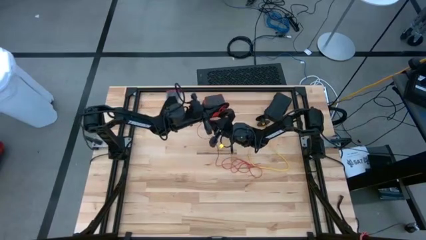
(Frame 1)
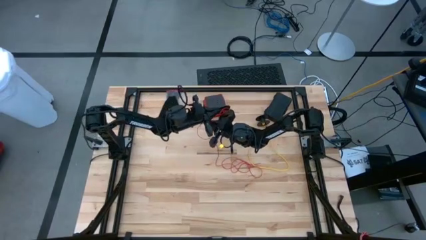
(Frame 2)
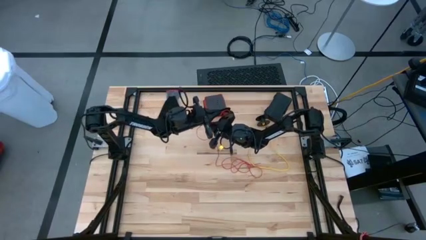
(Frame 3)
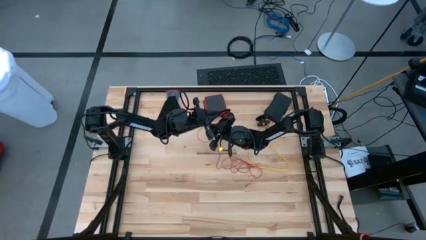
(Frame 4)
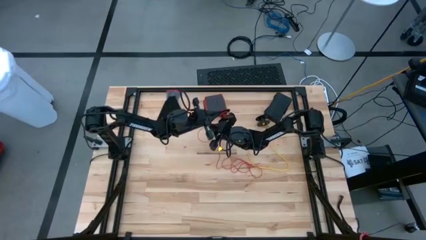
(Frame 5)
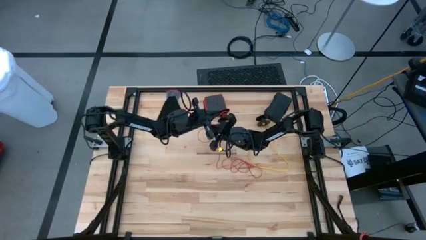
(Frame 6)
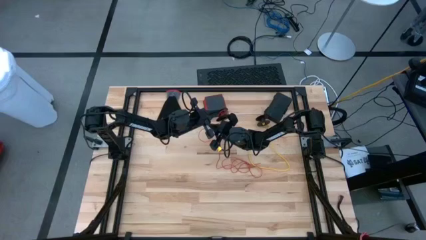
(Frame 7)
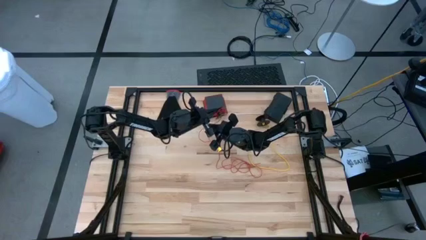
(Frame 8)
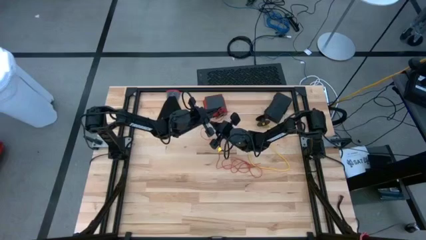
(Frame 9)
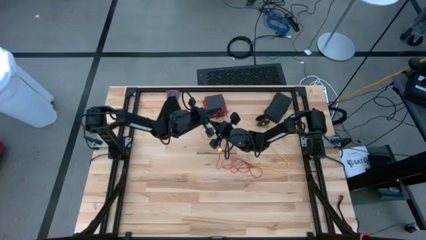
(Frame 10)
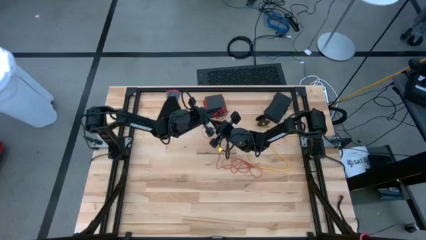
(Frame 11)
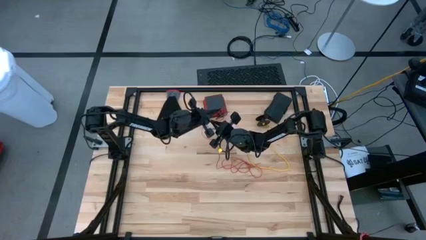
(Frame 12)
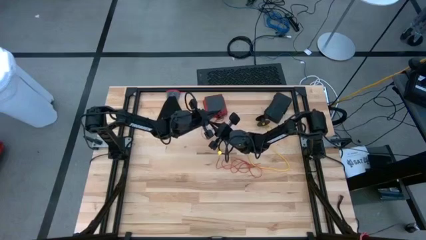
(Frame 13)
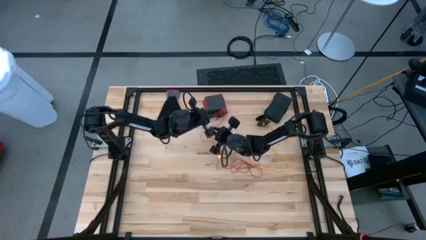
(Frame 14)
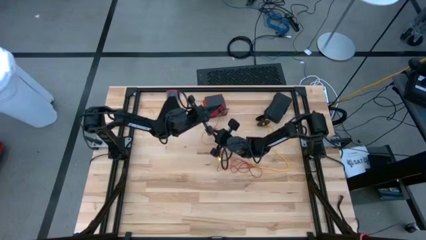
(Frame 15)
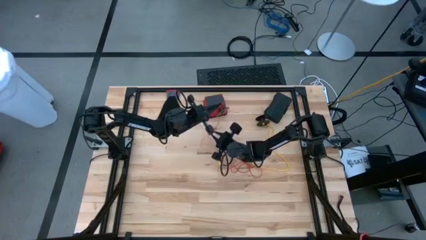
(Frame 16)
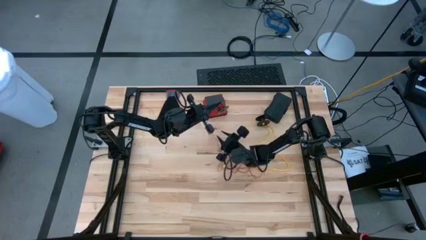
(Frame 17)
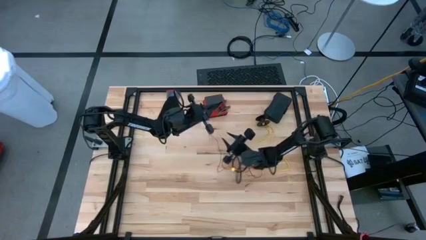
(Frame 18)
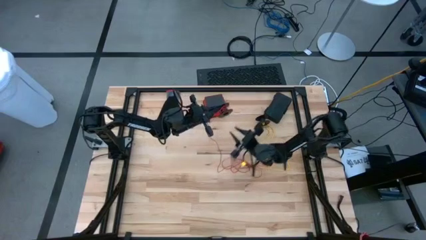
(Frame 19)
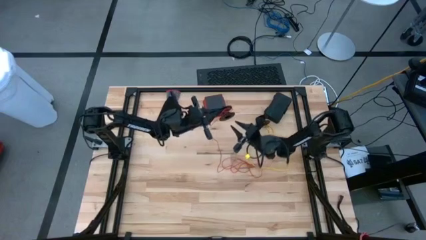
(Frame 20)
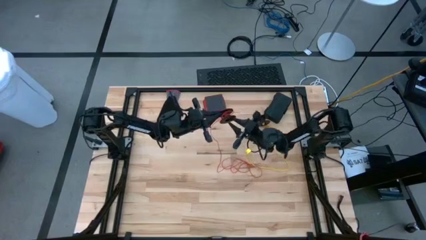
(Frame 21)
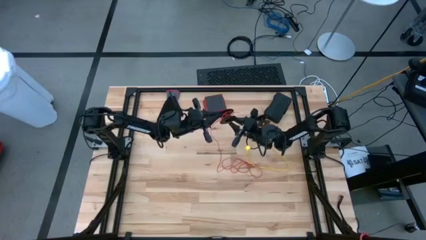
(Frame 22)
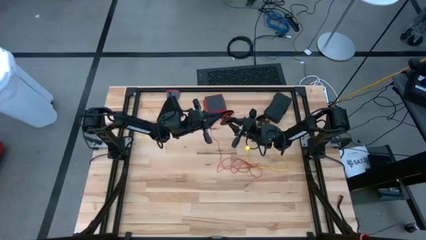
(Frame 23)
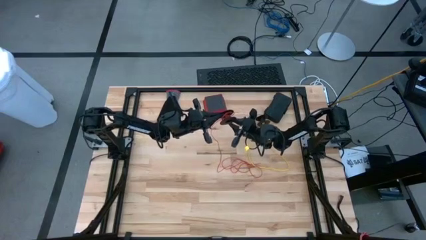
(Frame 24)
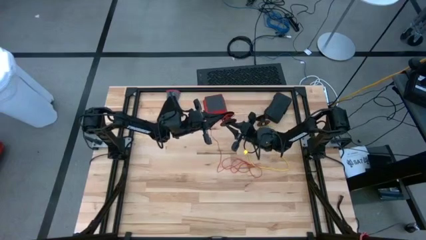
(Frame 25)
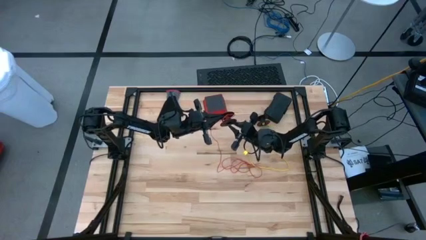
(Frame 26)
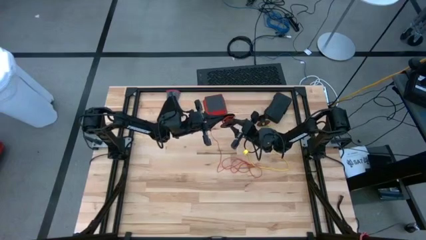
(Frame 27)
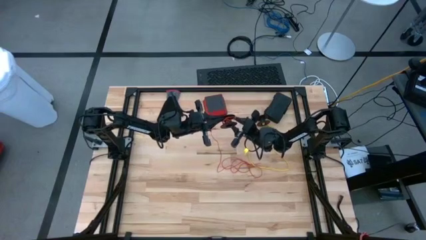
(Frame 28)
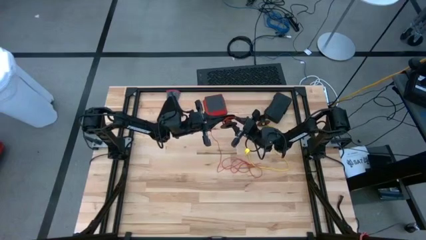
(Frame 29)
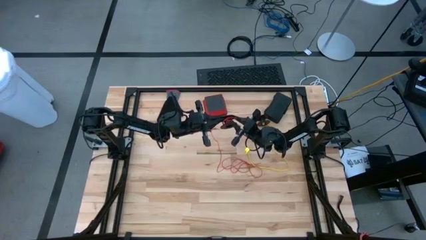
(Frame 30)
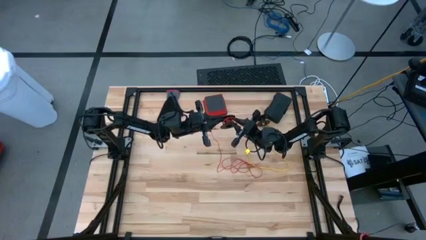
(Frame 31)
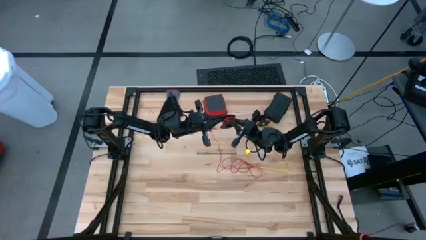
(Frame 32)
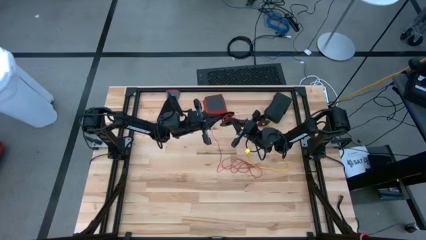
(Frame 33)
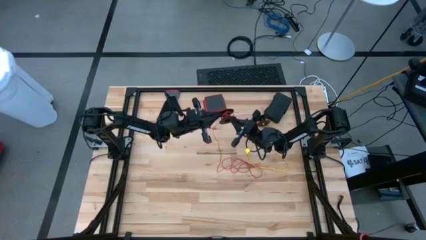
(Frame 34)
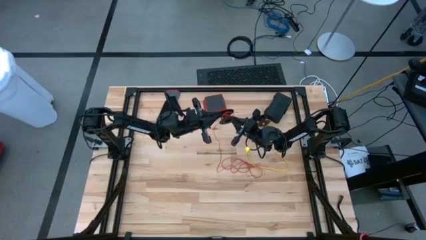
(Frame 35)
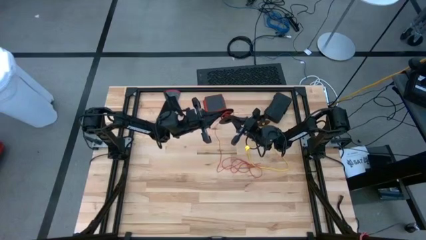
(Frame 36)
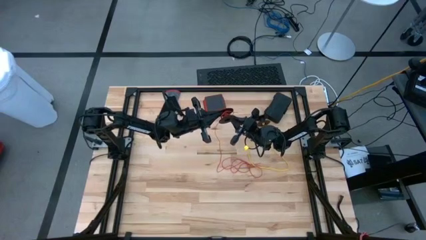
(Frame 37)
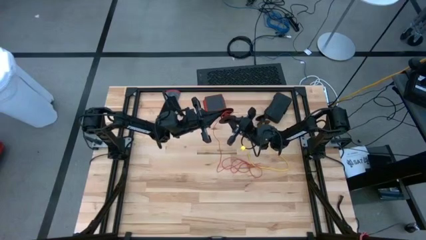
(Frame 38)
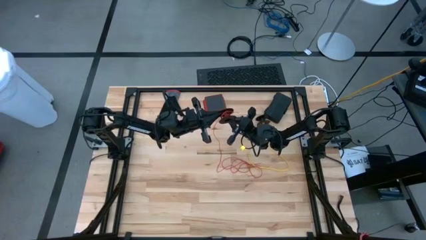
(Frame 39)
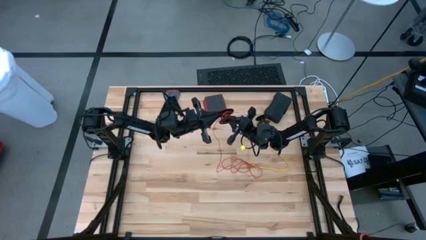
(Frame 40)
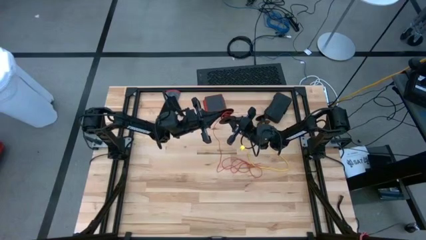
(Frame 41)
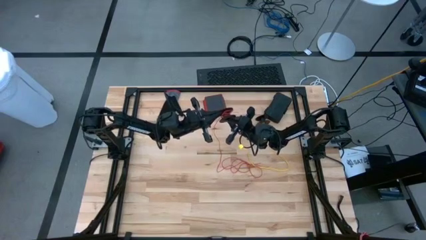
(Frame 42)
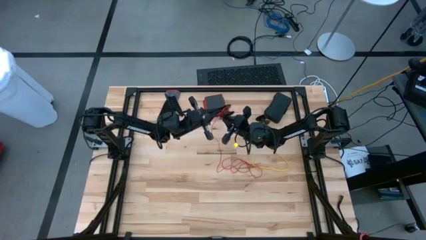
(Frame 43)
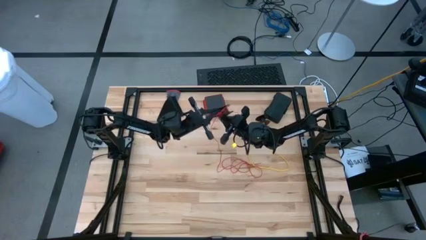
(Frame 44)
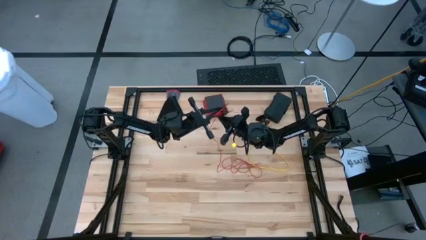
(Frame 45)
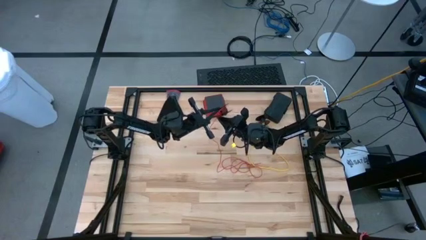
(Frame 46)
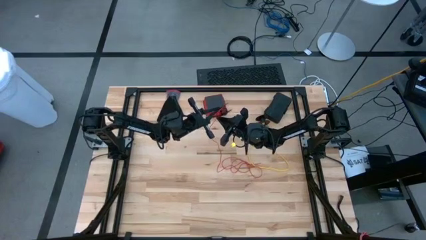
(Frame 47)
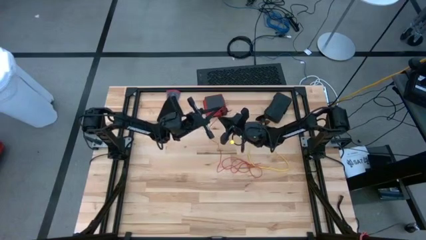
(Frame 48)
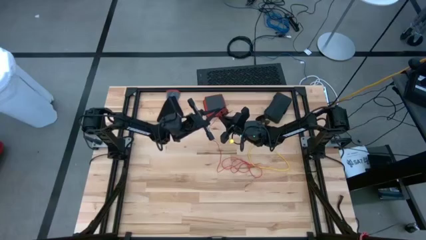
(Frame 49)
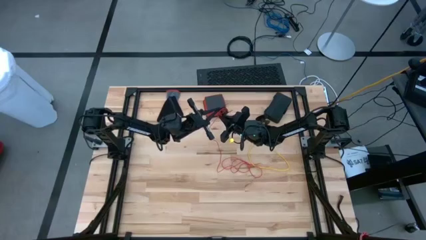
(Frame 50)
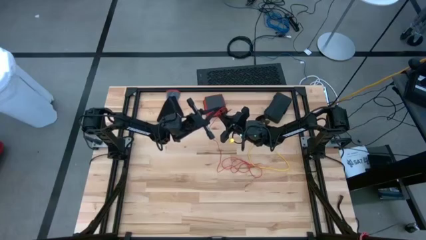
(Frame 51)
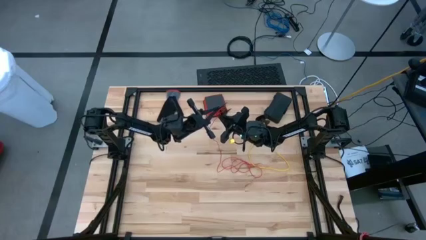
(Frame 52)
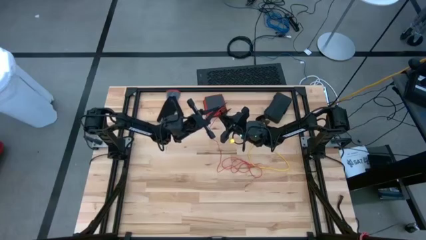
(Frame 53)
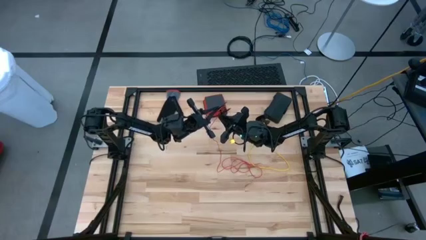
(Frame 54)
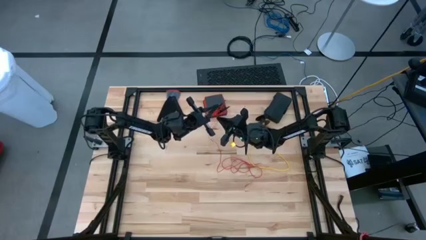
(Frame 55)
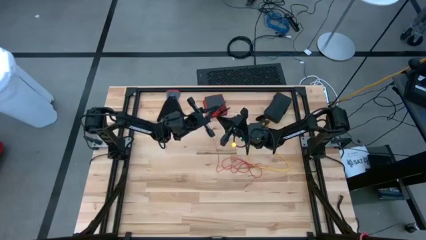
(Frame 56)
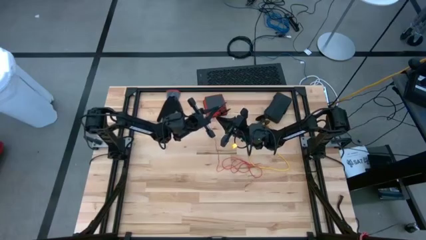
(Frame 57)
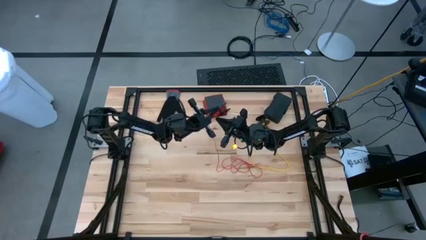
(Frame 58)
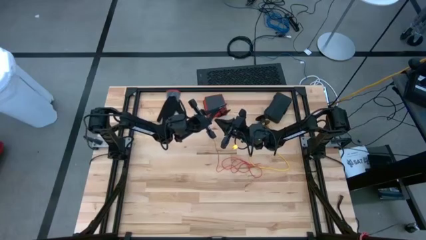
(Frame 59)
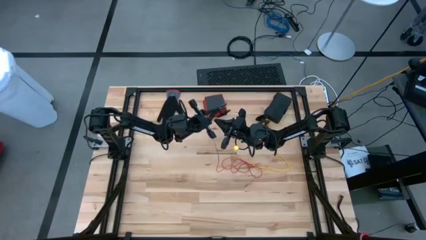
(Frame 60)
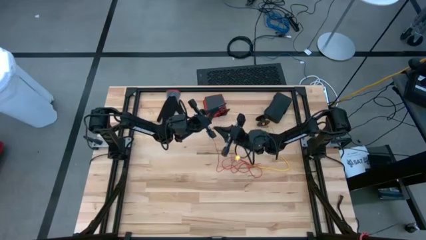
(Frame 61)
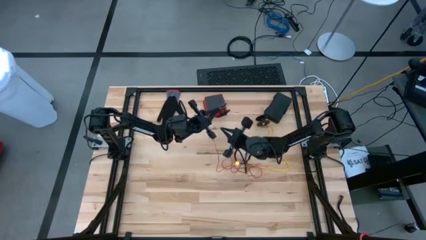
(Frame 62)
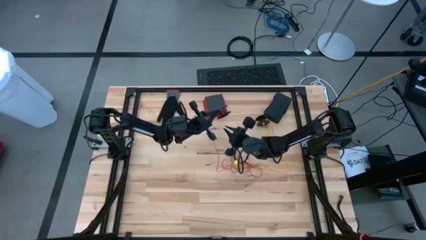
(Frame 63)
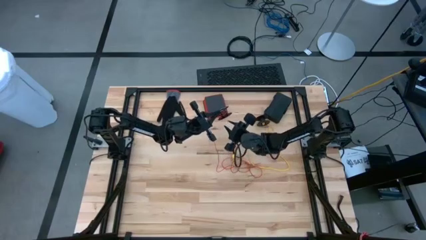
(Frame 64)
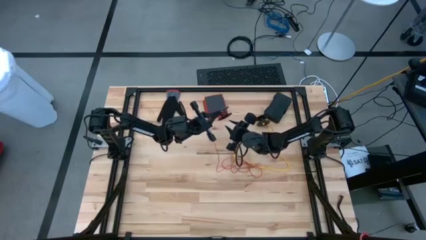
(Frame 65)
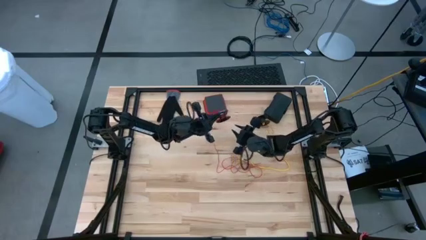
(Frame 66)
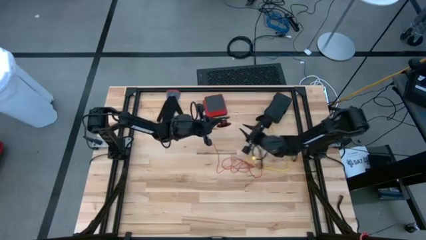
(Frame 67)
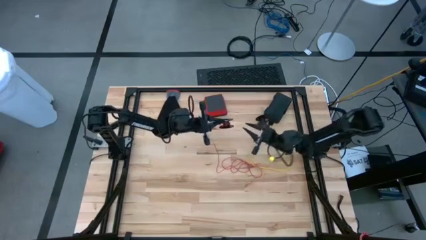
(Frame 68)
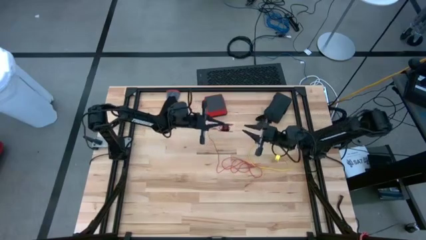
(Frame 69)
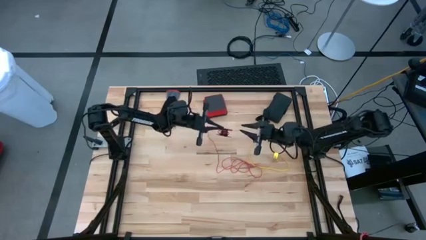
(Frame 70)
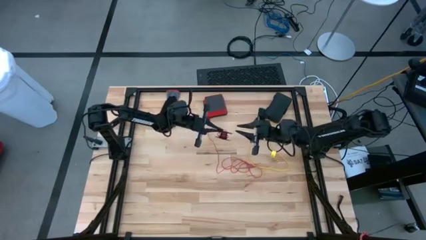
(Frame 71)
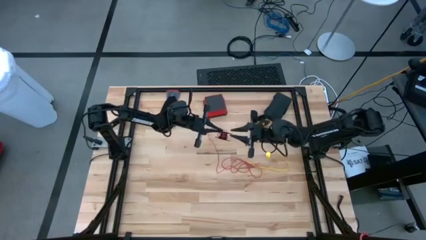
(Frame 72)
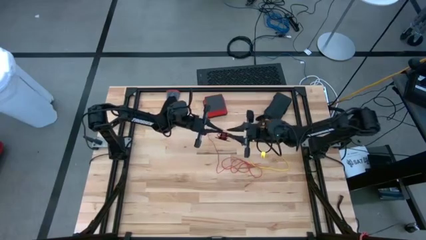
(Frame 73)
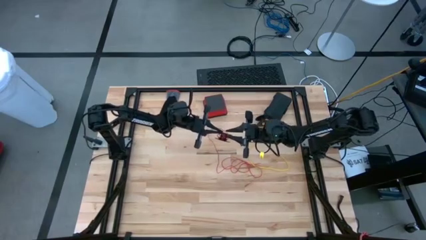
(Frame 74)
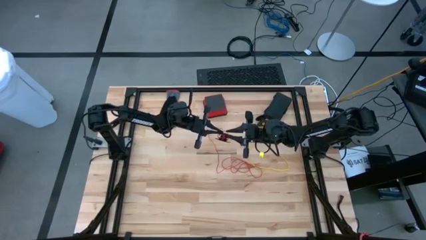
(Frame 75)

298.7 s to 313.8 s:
Task: Coil cords
Coil the red wire onto the spool
